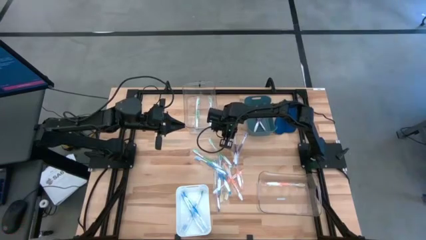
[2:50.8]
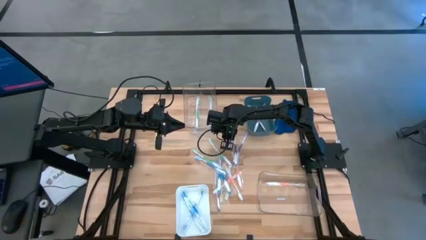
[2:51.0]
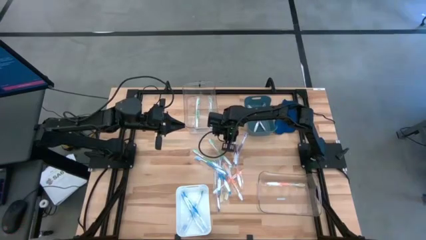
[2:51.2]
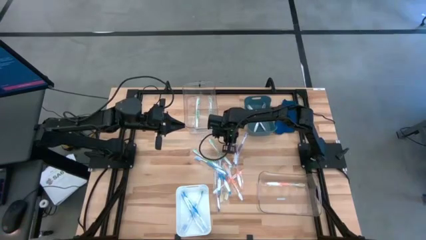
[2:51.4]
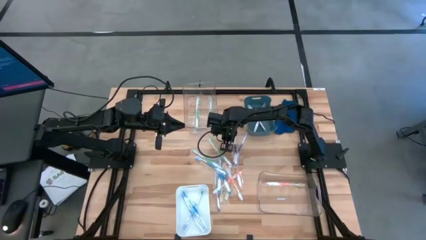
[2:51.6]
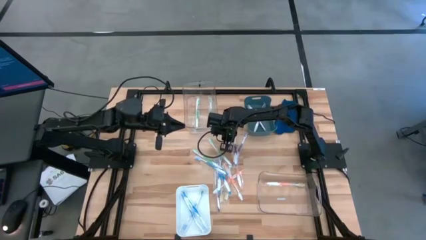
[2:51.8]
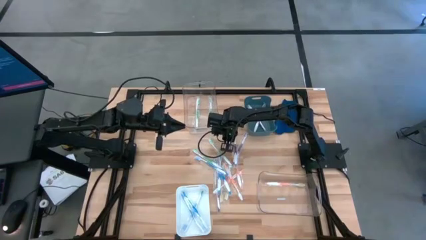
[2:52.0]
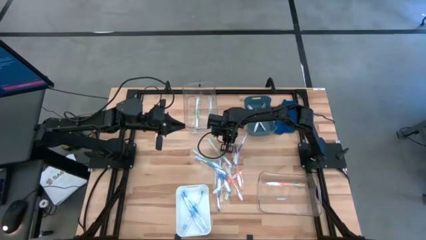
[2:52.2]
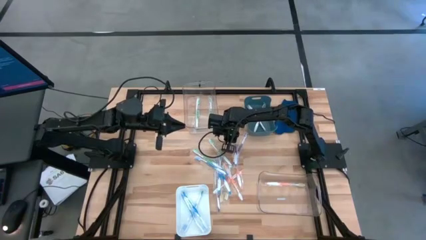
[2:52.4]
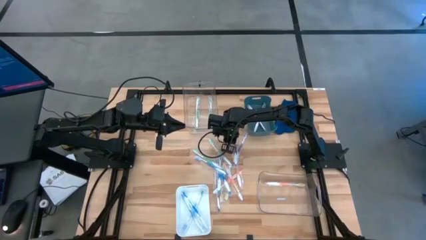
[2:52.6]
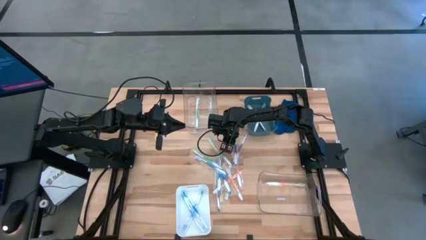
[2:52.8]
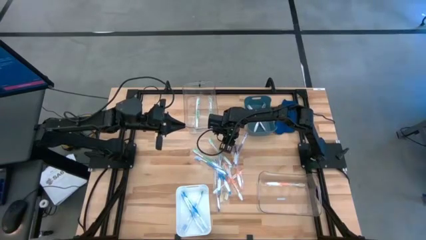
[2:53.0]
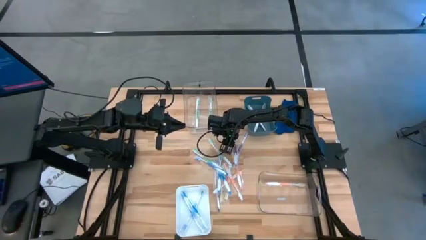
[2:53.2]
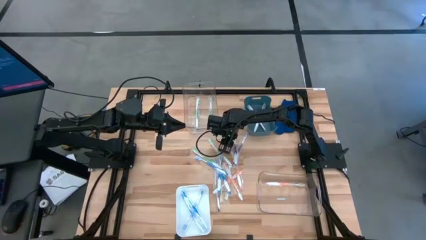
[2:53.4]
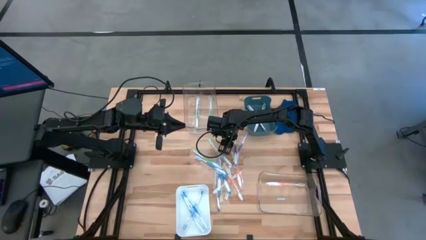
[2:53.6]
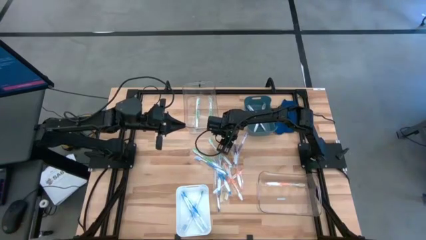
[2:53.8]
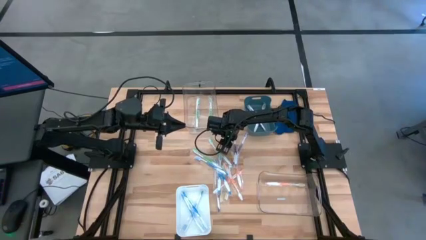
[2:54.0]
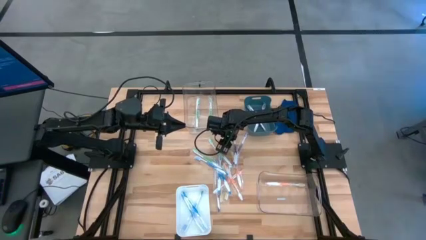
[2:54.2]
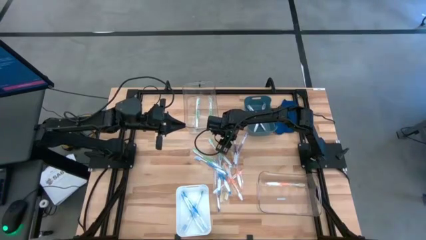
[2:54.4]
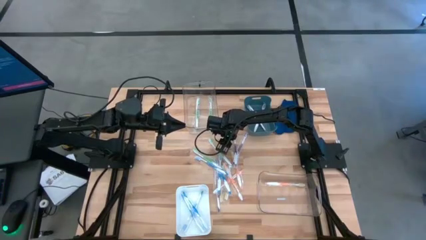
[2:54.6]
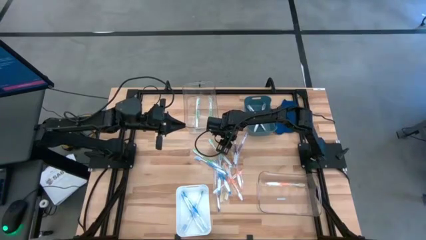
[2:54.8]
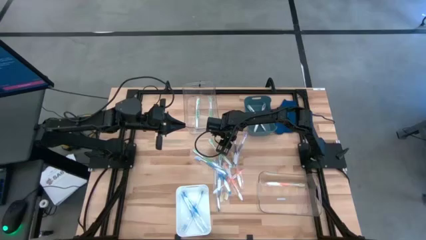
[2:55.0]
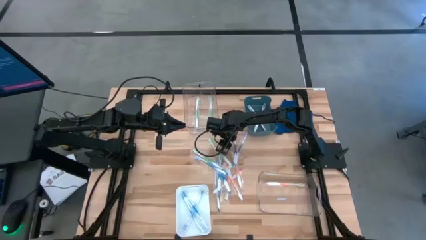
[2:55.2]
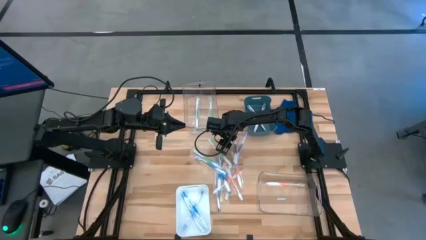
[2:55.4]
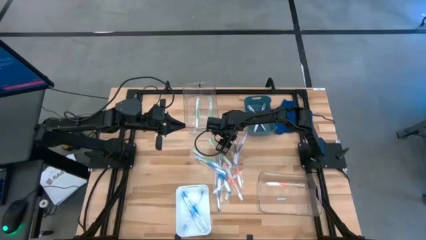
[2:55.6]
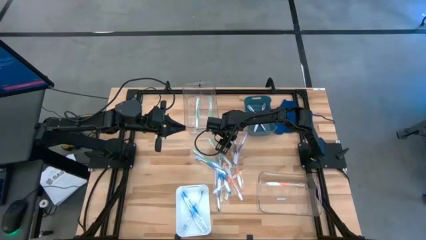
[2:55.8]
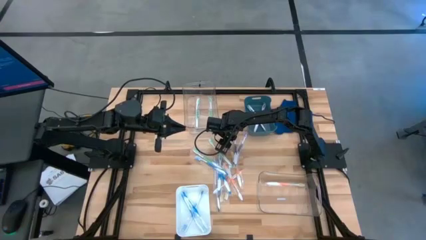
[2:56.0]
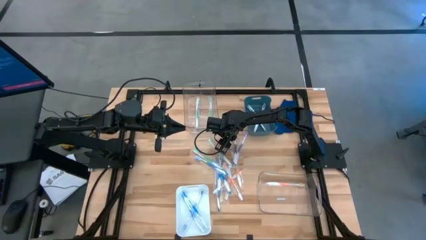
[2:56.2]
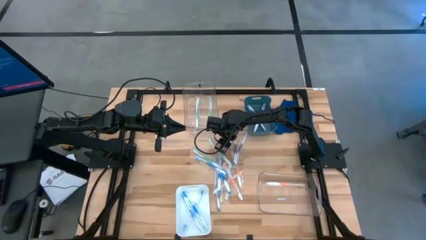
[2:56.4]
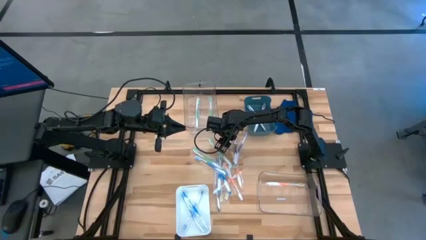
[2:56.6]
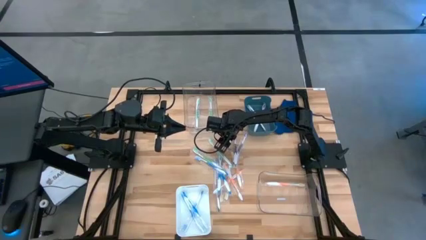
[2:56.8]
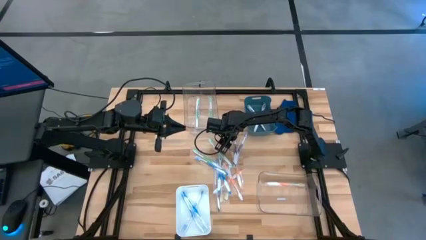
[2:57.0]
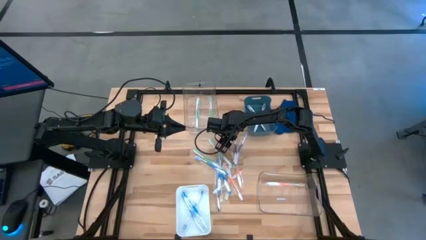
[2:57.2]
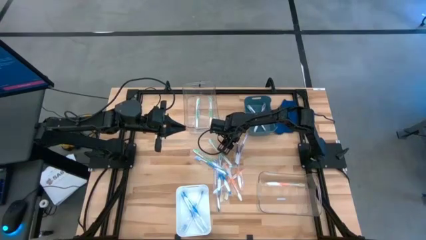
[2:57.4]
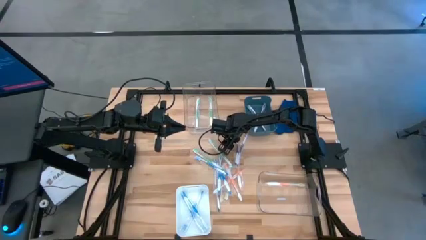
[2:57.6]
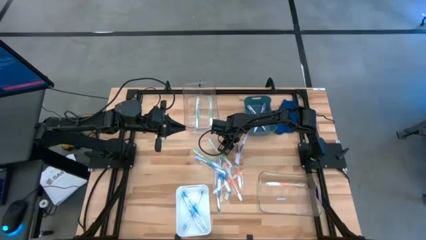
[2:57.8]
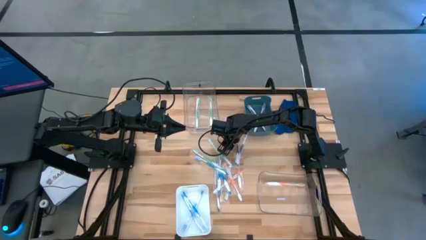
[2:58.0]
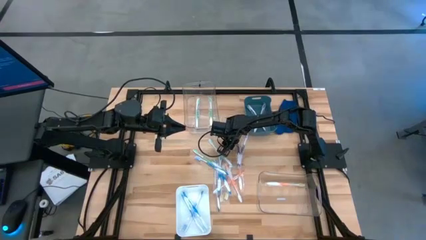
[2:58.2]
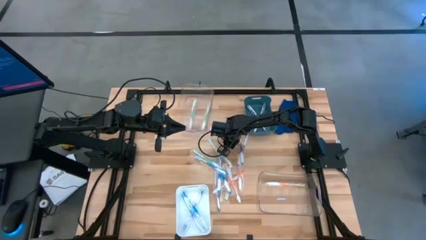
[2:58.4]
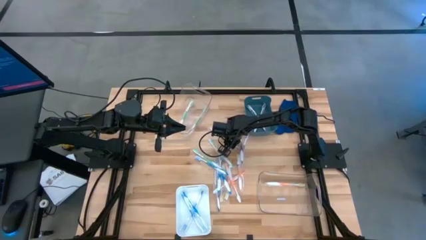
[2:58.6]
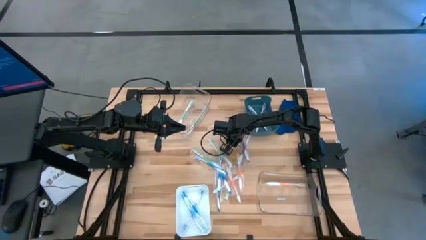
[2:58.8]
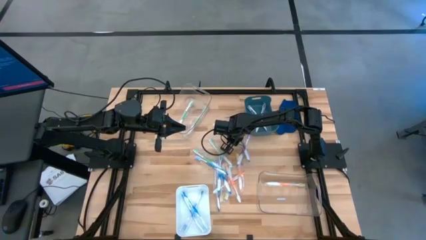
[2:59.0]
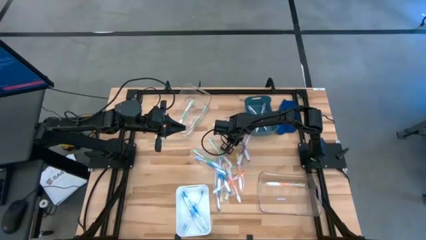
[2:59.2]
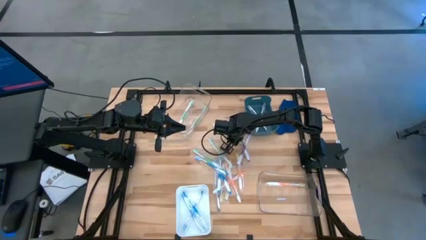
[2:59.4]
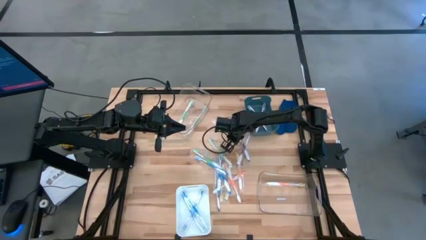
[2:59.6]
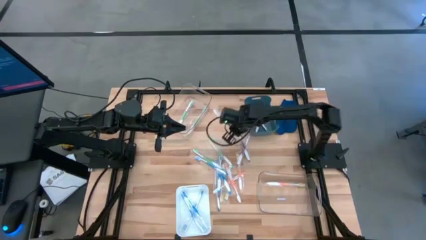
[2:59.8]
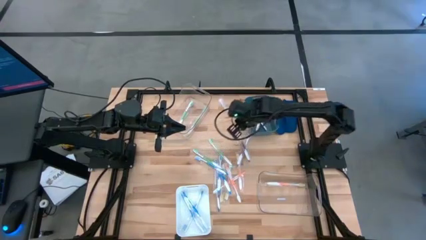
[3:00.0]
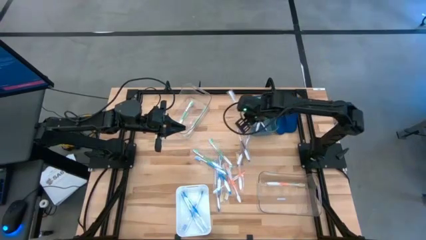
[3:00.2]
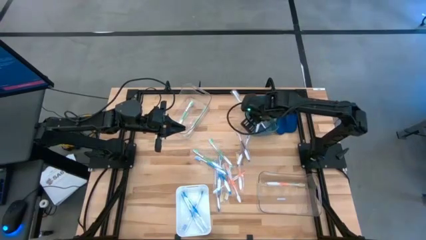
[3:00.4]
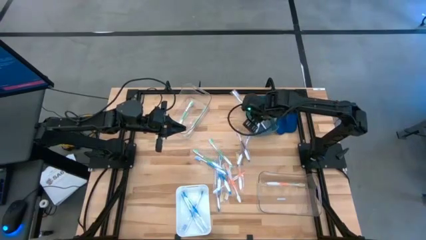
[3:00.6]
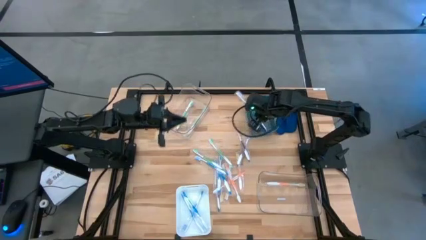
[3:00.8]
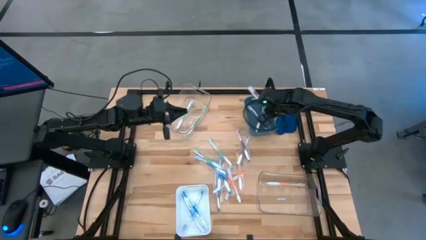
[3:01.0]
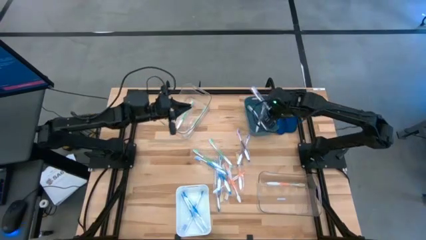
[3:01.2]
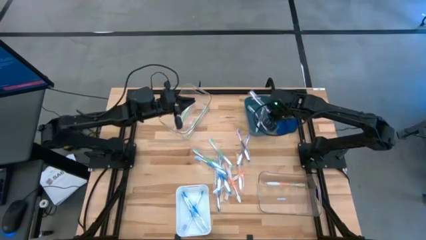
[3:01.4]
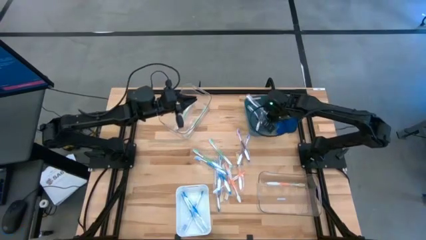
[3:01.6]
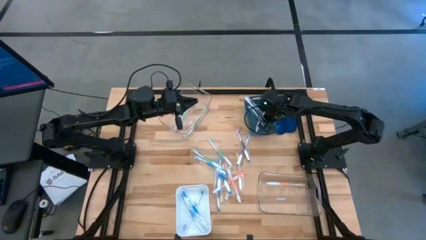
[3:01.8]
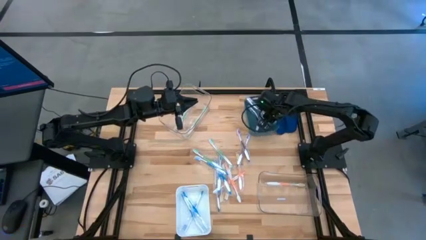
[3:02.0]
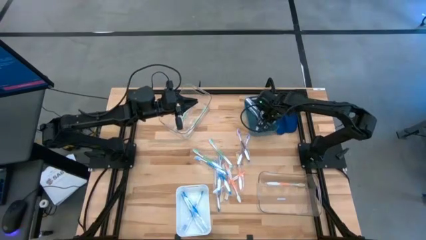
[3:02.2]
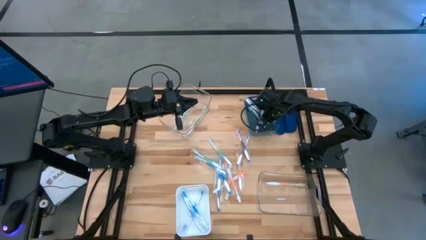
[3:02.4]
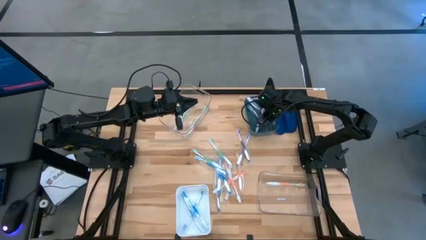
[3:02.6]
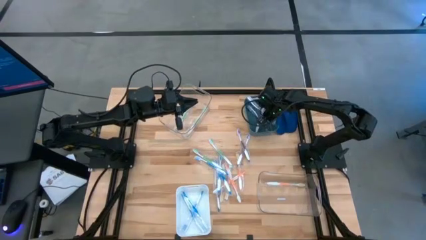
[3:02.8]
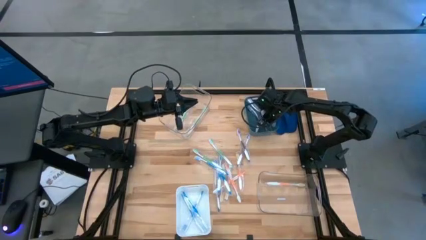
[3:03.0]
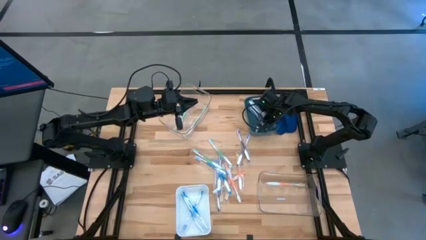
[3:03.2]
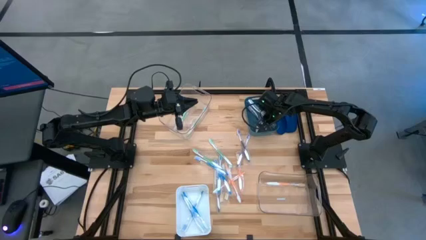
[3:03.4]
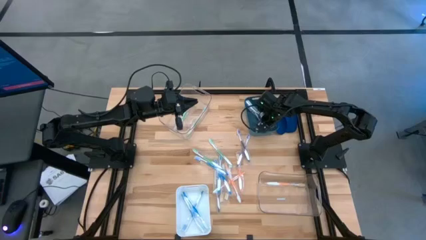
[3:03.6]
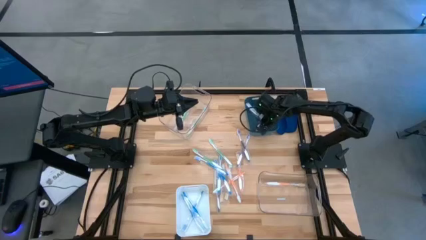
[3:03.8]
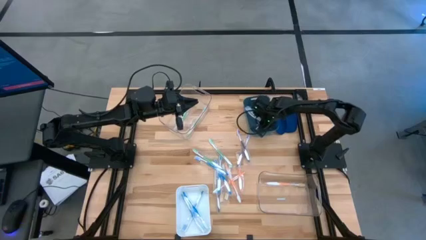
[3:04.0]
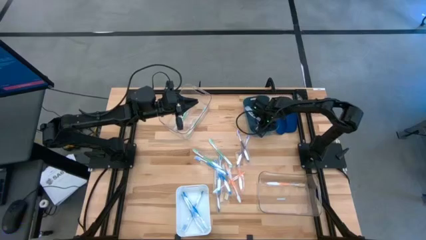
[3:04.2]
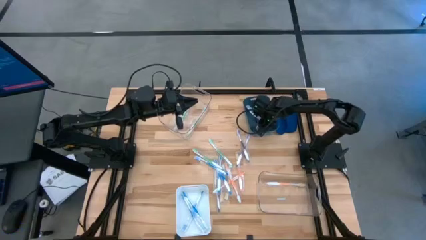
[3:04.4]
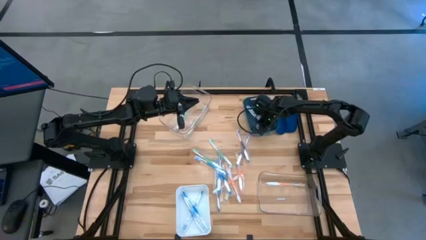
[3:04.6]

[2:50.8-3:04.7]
Task: Pick & Place Toothbrushes
Put the purple toothbrush into the green bin
